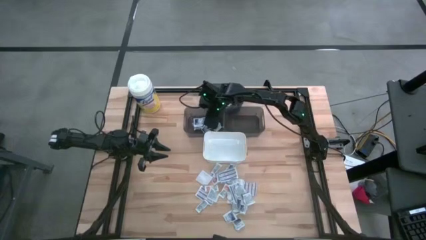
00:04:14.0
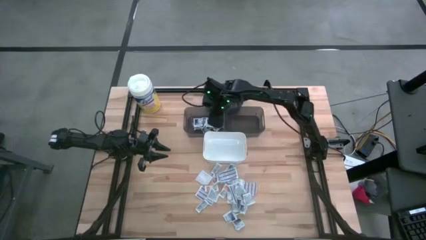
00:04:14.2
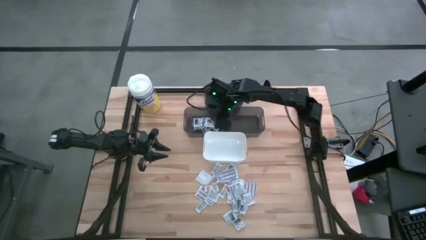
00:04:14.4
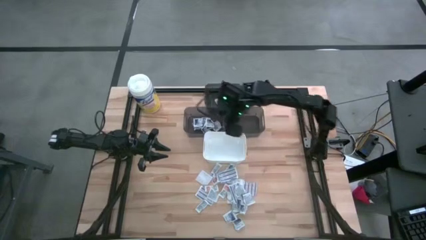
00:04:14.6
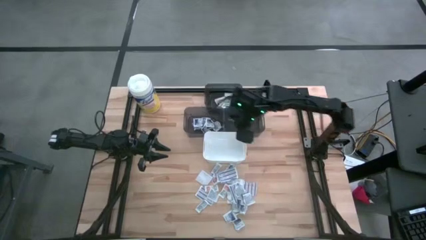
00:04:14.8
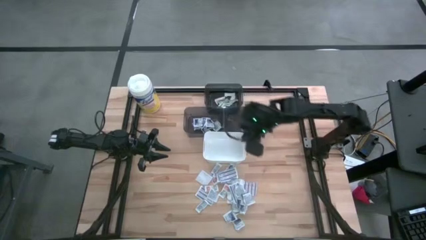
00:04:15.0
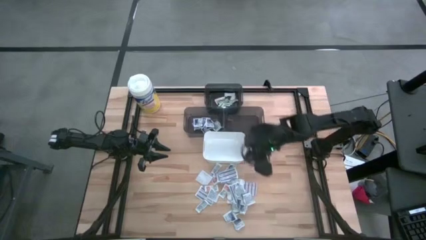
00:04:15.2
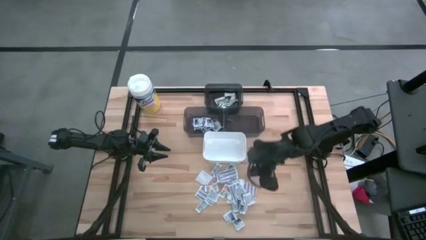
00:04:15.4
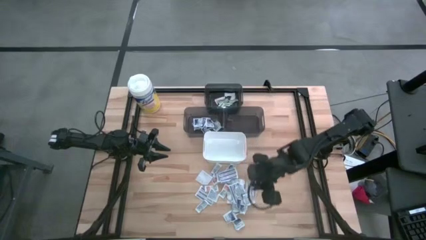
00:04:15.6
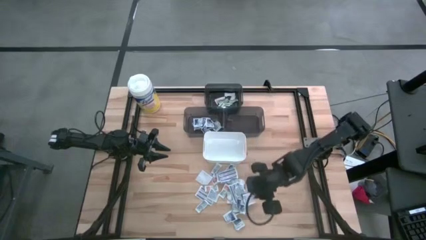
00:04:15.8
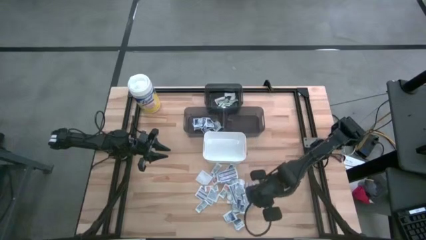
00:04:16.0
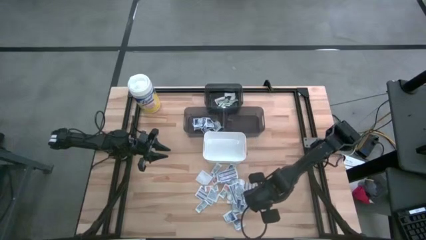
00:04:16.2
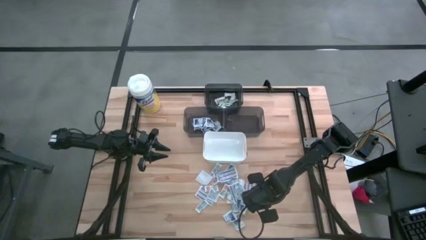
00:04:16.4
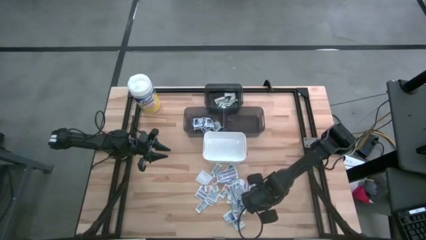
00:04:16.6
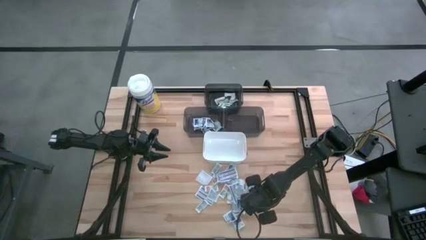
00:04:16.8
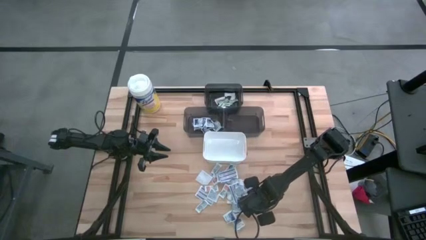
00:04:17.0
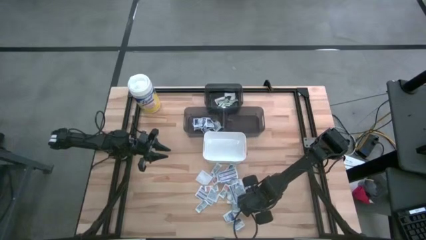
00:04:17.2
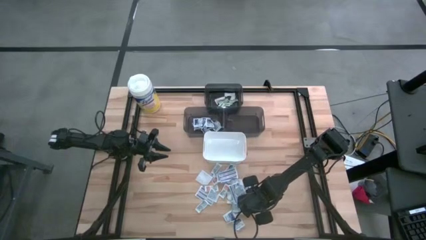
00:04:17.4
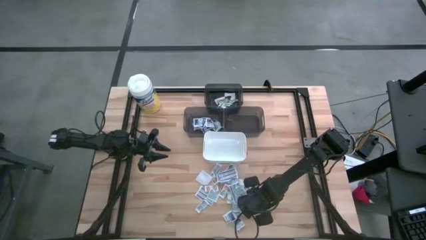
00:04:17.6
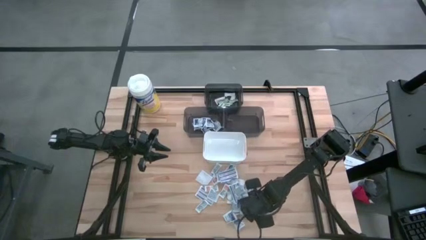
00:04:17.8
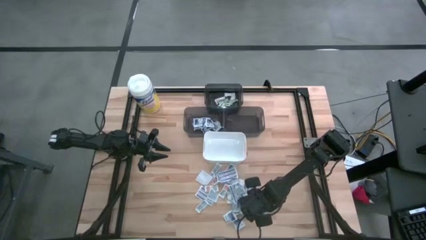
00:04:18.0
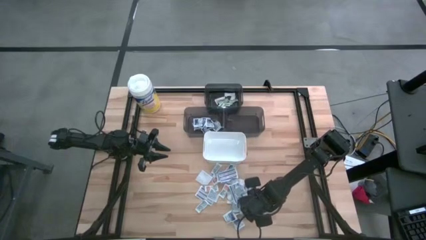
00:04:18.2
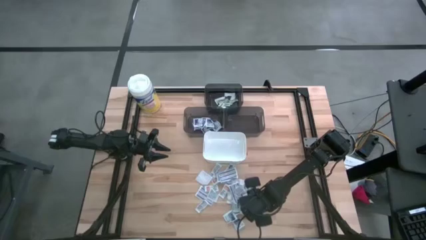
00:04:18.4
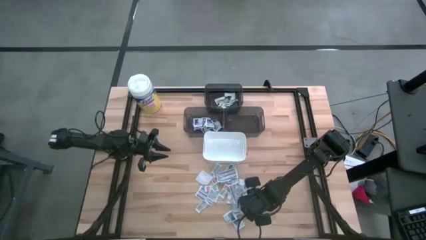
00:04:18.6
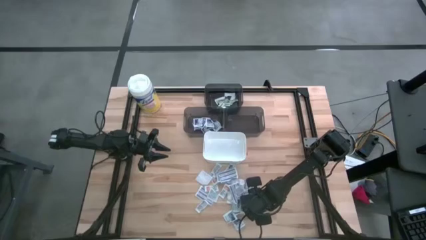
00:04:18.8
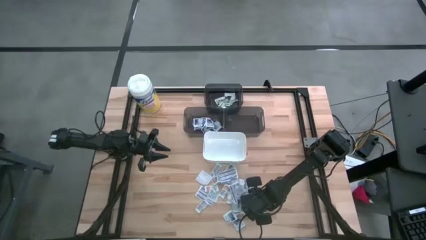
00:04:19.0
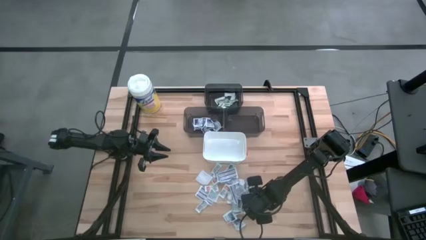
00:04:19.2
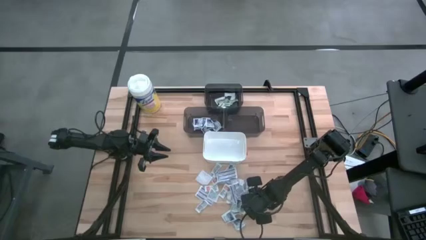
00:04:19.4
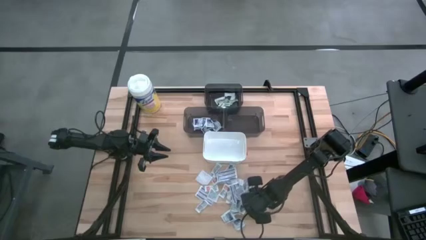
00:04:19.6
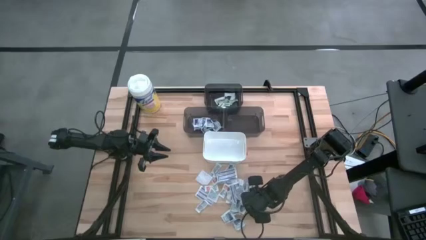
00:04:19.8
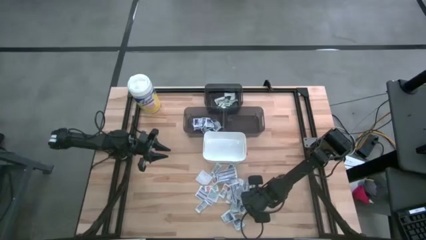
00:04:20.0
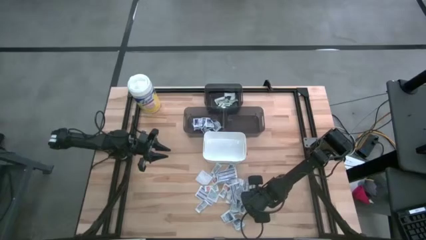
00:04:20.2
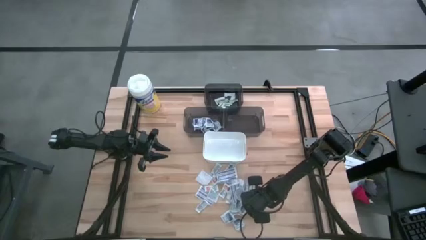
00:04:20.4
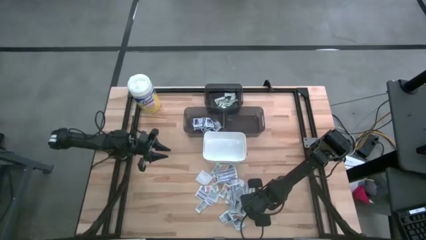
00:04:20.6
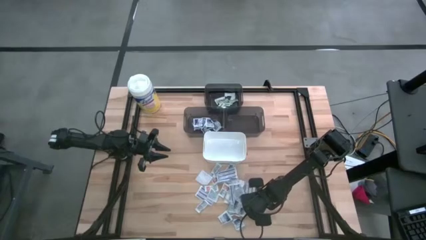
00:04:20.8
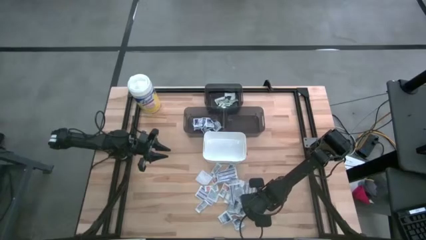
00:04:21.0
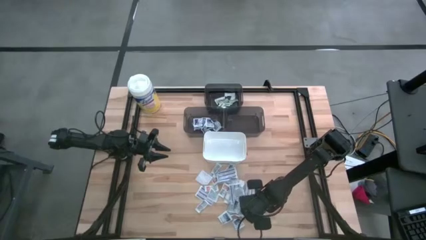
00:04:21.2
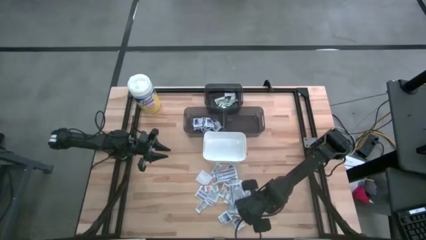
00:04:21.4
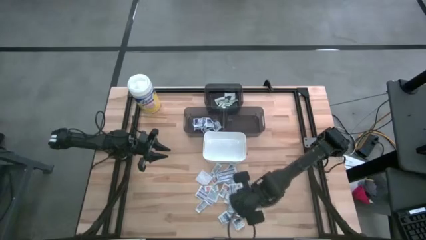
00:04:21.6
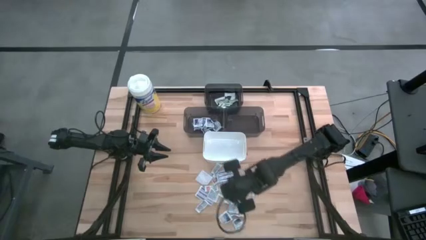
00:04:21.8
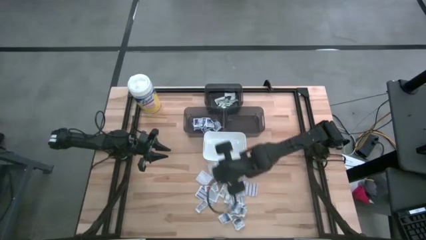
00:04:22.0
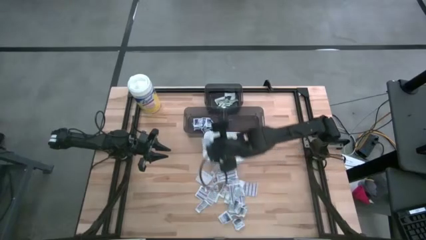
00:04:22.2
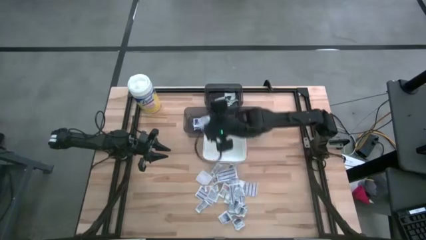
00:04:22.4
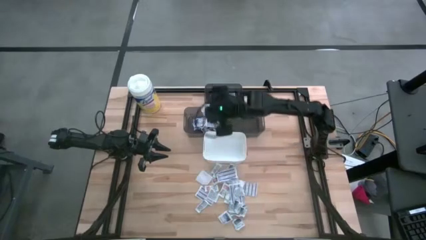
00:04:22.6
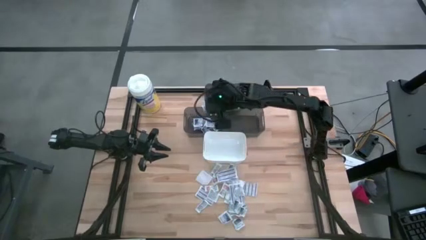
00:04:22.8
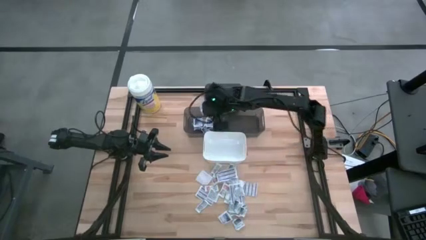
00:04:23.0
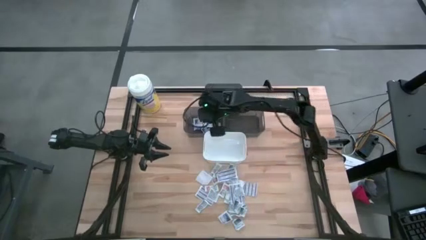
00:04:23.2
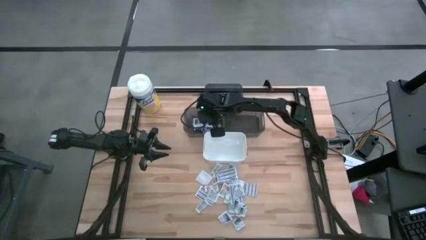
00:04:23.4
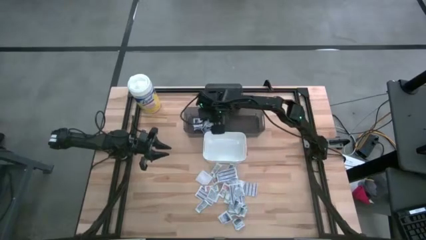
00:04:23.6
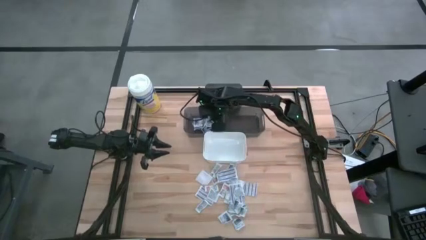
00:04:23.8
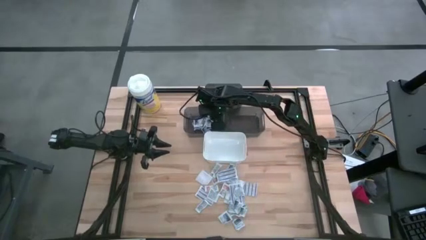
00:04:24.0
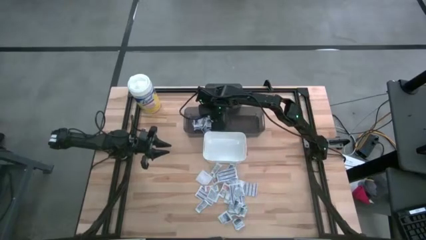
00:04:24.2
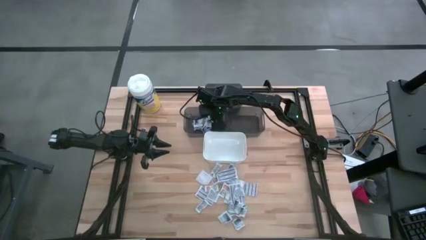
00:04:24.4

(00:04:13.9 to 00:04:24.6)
Task: Pick & Place First Aid Supplies
Put the alcohol pad into the left black bin

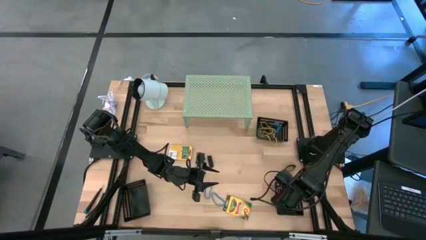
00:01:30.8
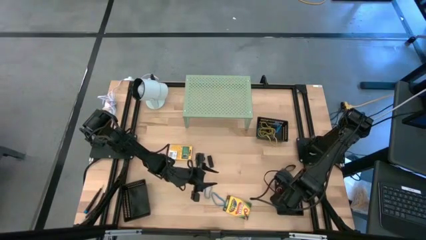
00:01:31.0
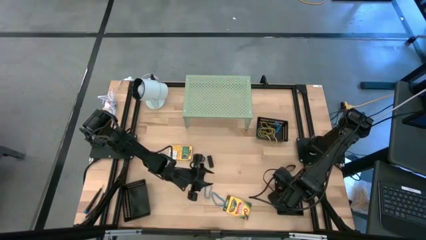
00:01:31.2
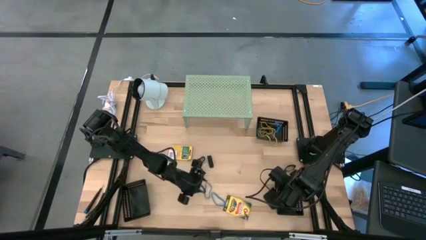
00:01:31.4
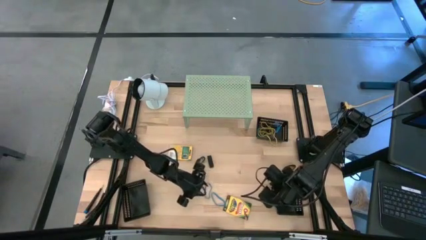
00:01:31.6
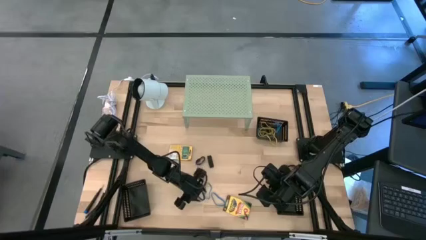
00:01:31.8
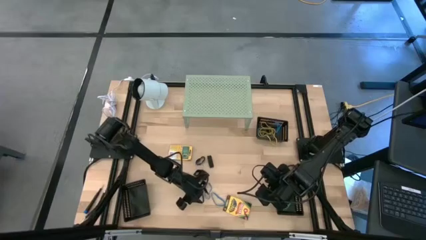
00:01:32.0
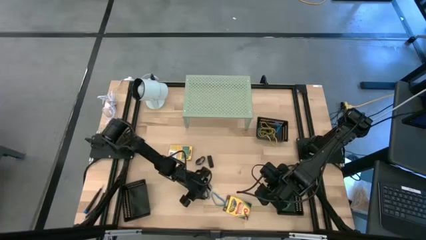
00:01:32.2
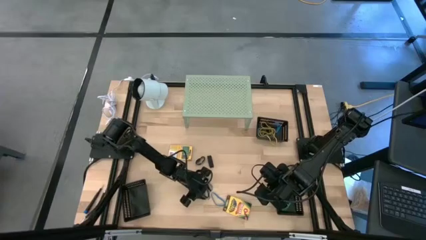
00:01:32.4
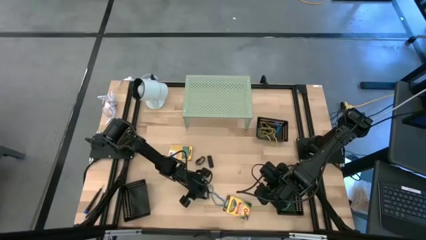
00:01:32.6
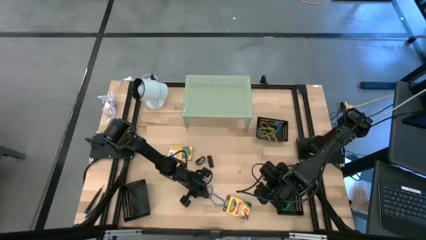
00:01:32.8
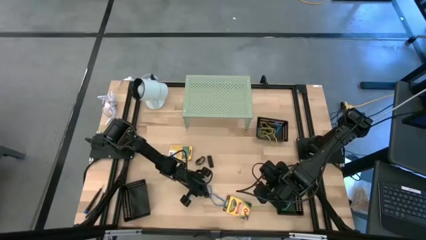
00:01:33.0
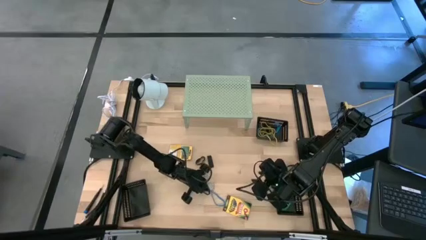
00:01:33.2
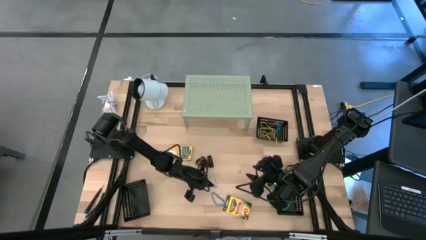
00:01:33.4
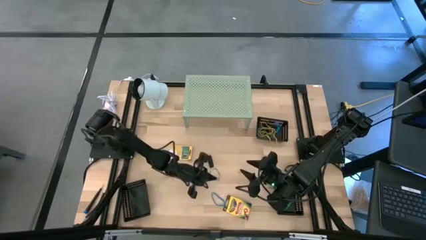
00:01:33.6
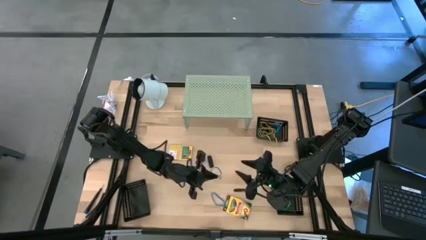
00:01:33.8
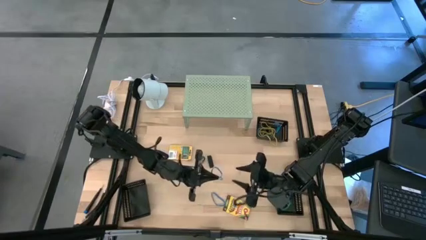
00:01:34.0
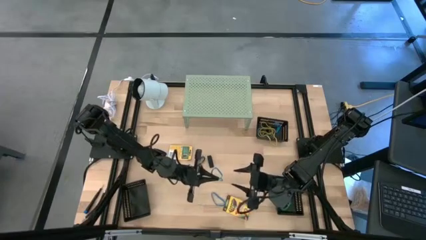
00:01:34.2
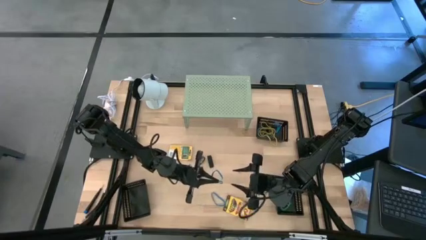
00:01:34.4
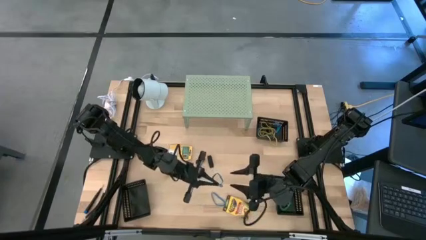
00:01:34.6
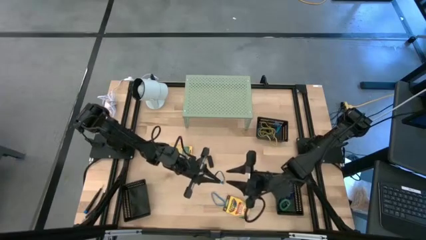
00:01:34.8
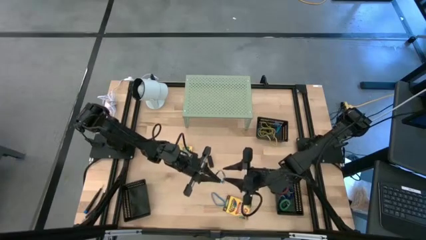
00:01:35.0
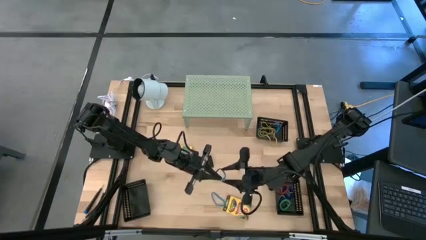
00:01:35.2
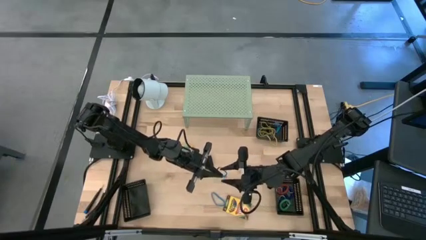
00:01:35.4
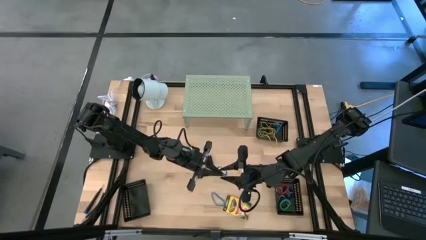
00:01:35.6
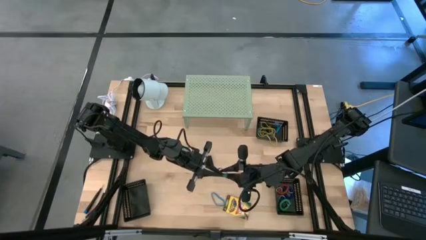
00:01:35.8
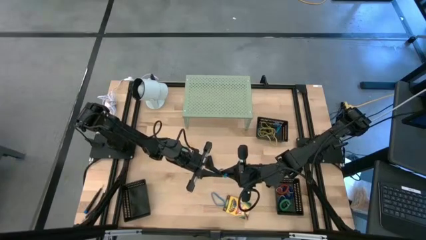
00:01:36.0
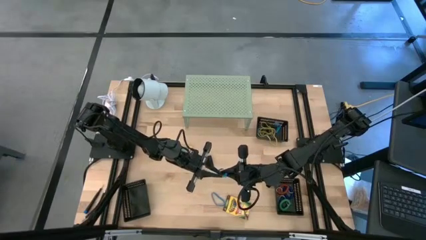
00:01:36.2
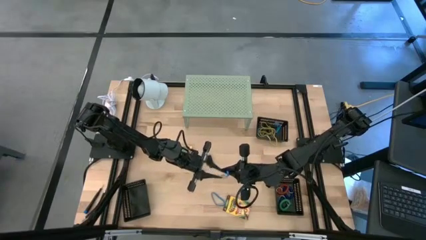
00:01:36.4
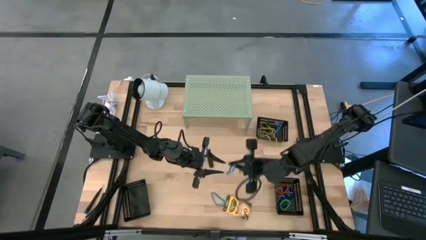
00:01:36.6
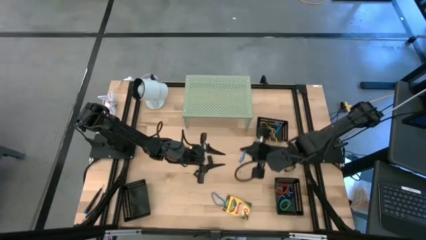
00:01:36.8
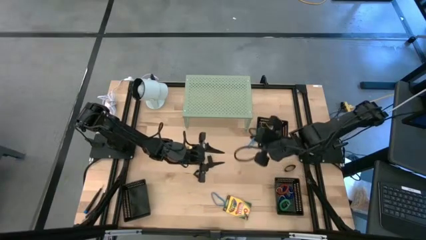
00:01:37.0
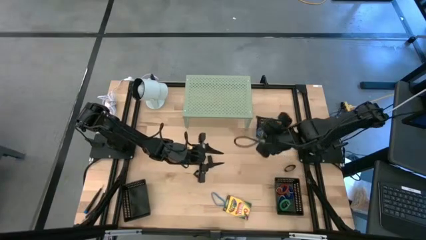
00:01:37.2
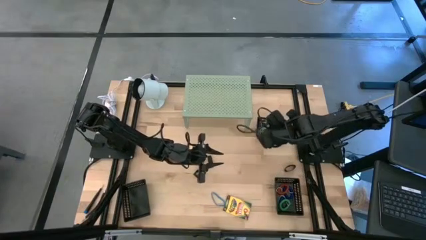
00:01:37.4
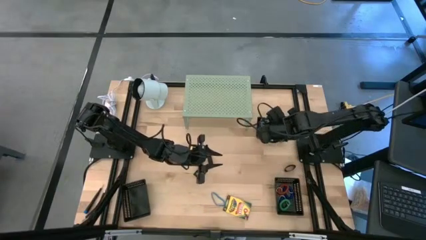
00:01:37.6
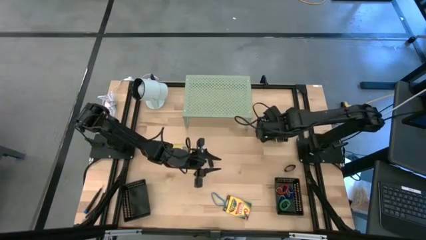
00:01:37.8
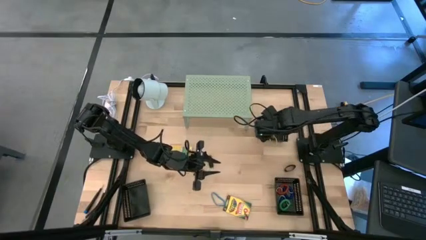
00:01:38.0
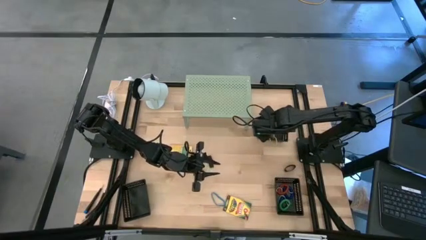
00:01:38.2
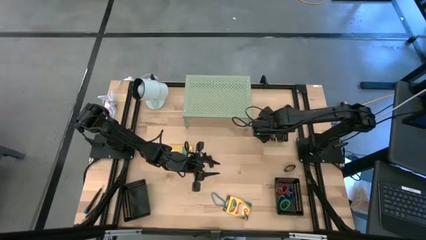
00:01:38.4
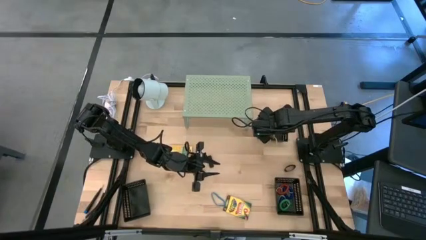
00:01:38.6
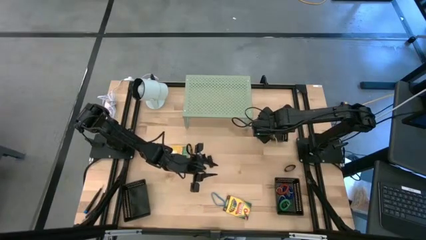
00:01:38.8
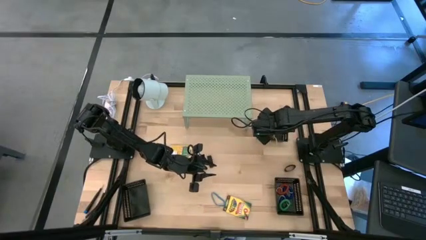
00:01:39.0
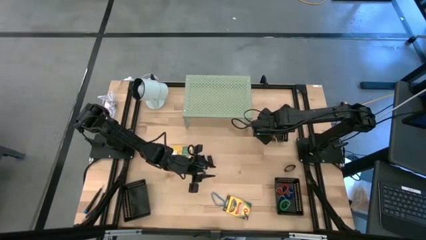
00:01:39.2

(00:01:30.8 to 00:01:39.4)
Task: Pick & Place Office Desk Supplies
Put the blue rubber band into the top right black bin
